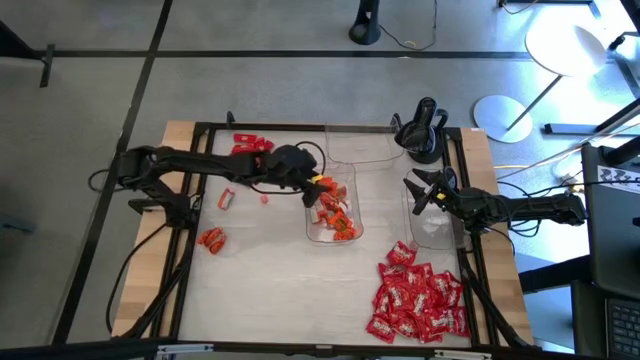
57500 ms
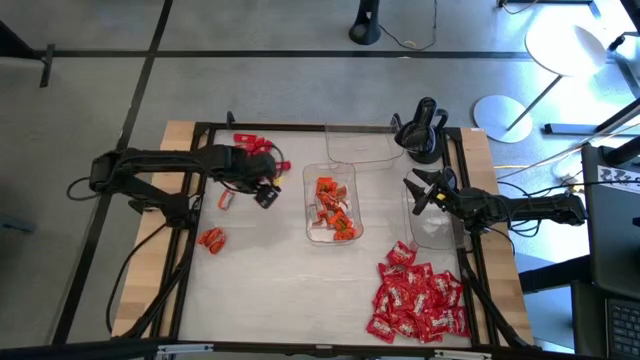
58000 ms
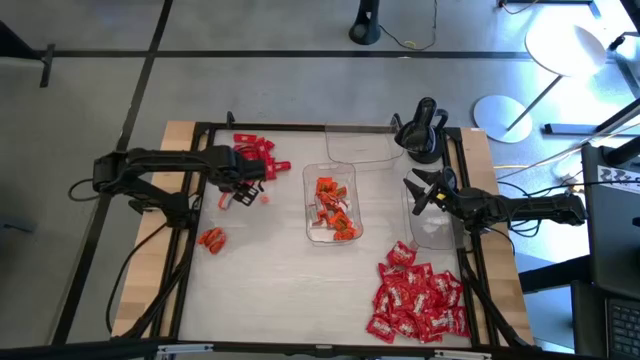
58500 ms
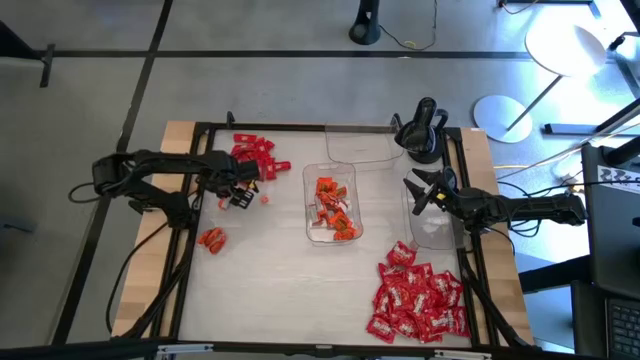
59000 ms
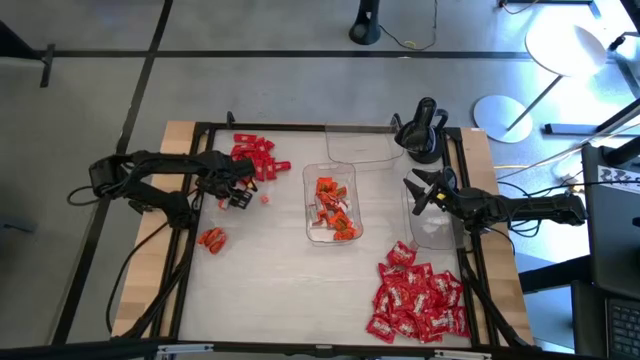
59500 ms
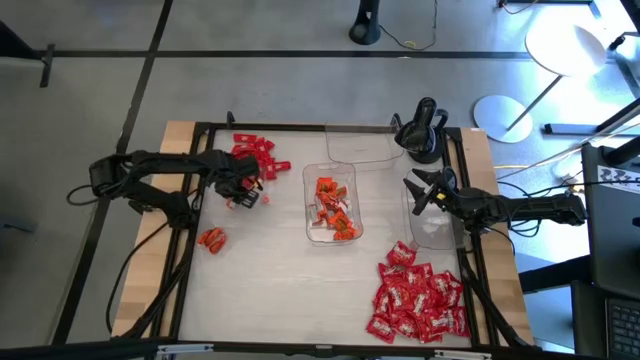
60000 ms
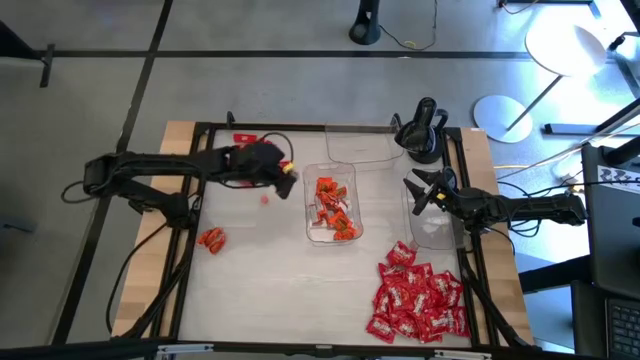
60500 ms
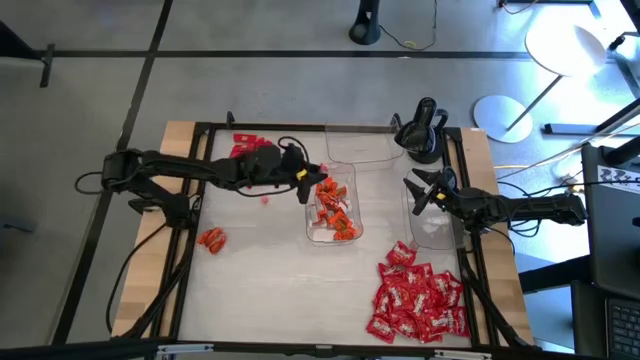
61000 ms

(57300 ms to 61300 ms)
Task: Sort candy
Put the orange chocolate into the bottom left transparent bin

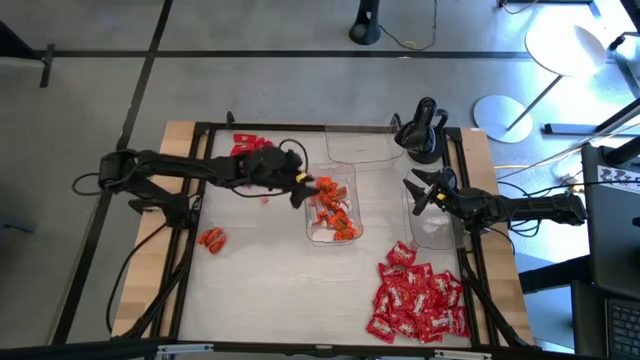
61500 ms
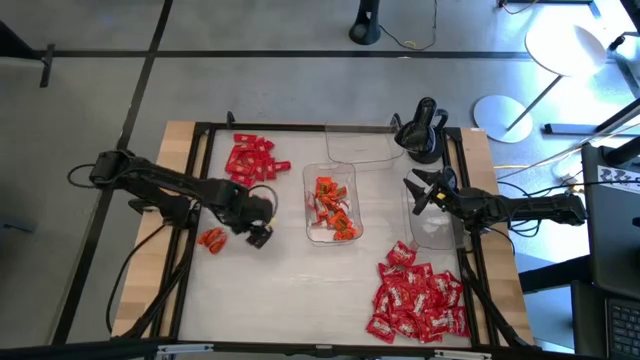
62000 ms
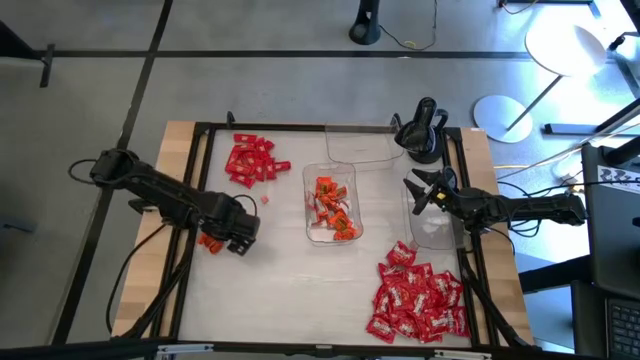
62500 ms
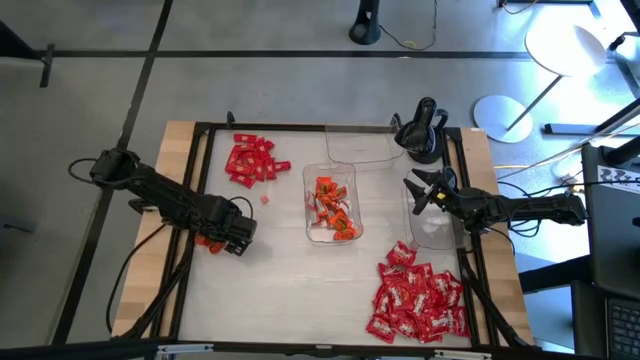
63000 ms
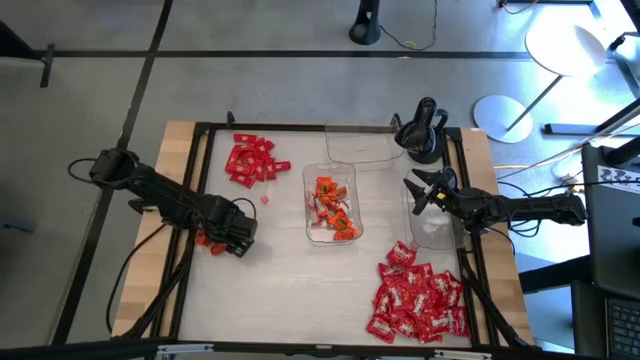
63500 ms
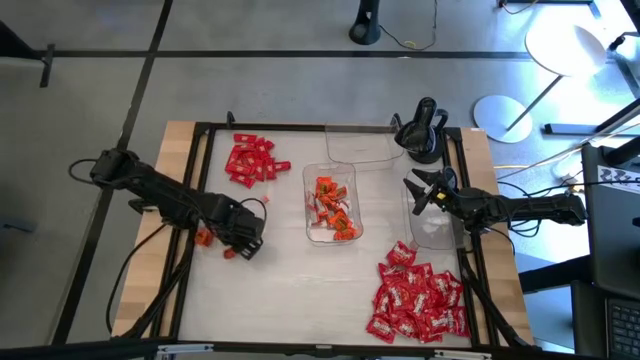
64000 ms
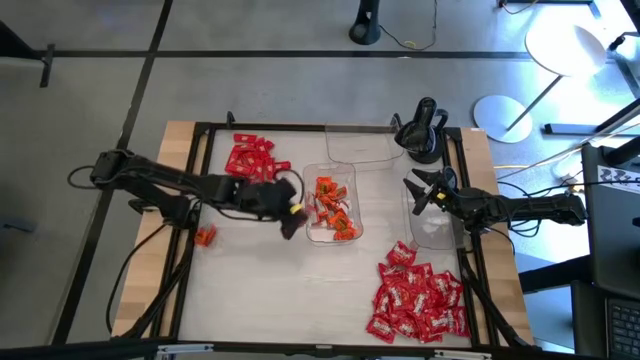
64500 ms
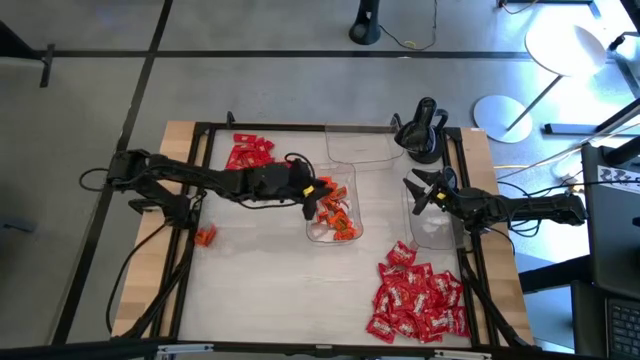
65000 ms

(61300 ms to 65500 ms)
Put the orange chocolate into the bottom left transparent bin

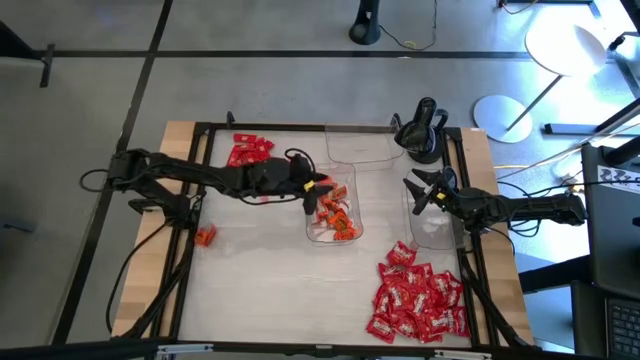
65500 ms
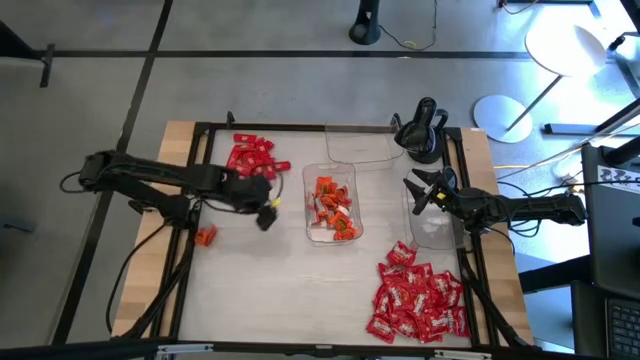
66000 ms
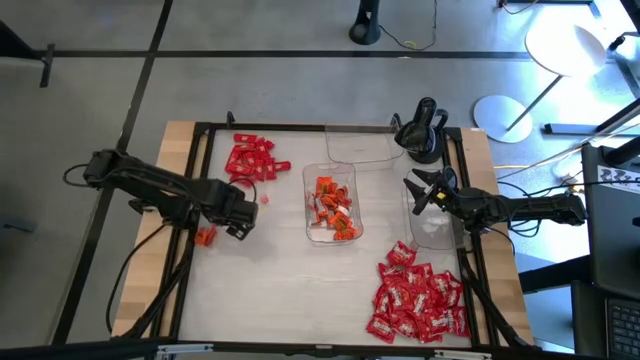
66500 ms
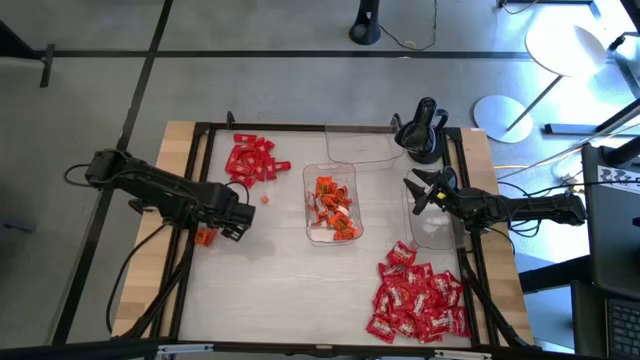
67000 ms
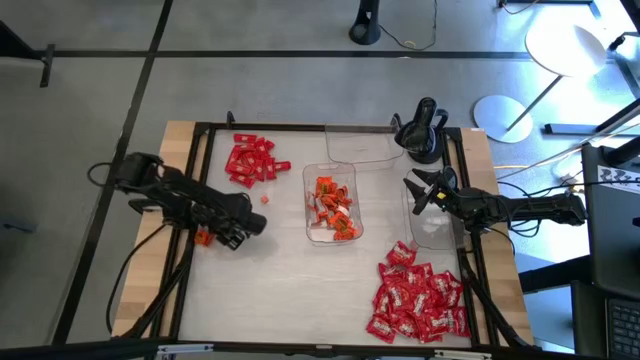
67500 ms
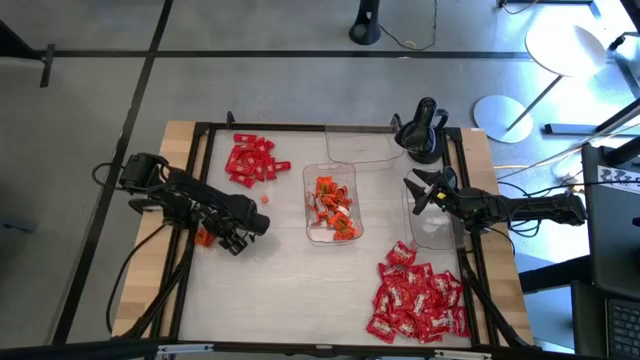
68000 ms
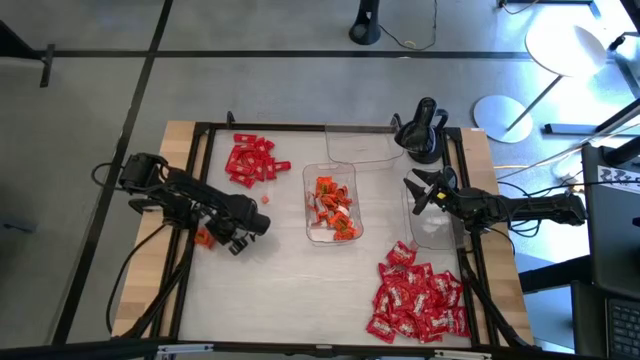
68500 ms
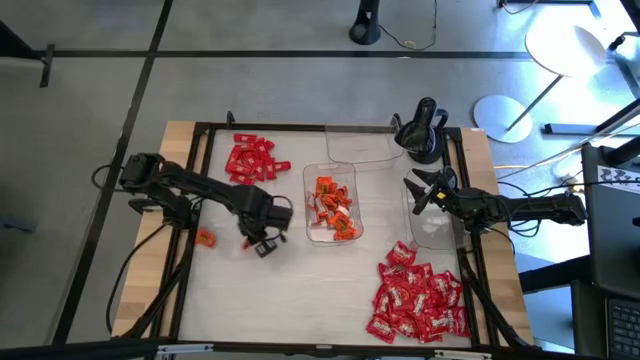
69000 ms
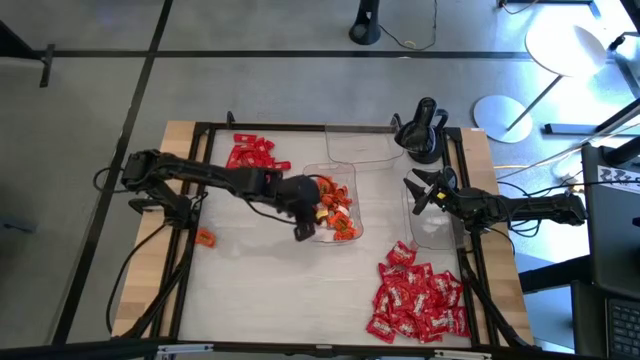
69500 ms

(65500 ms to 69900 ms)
Put the orange chocolate into the bottom left transparent bin

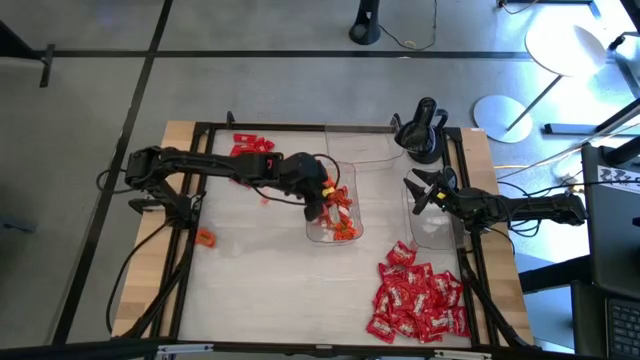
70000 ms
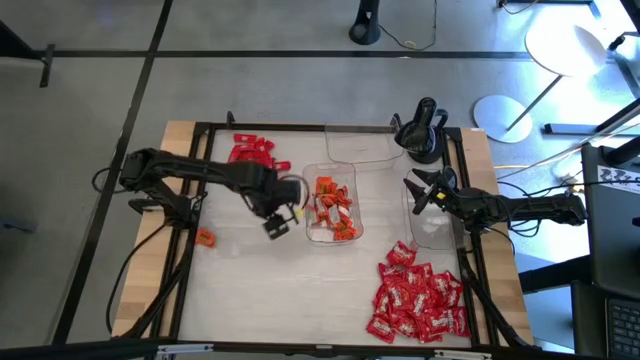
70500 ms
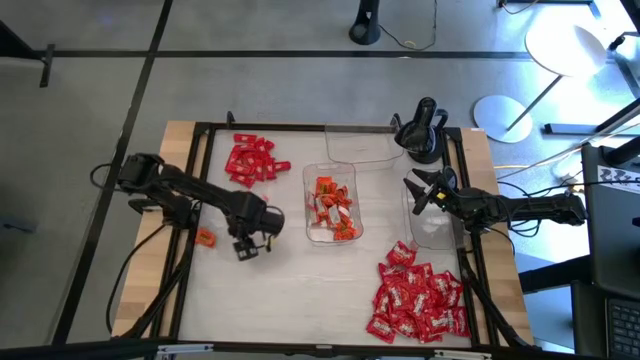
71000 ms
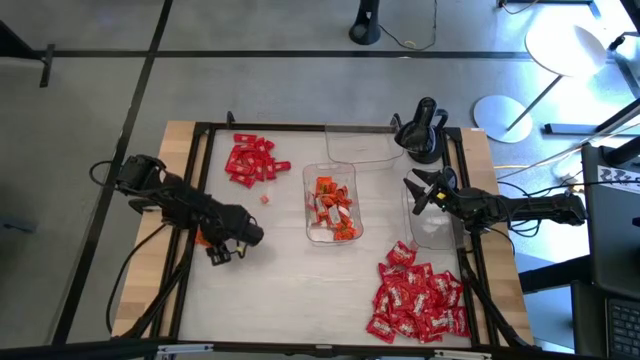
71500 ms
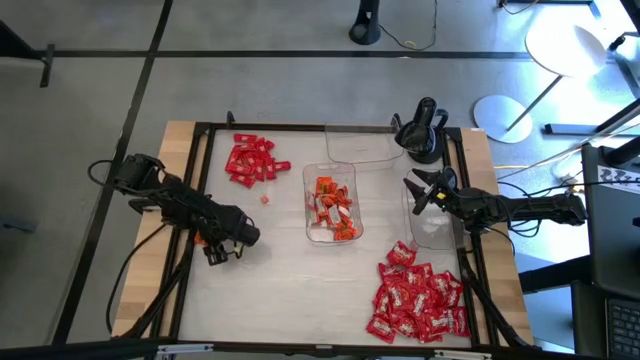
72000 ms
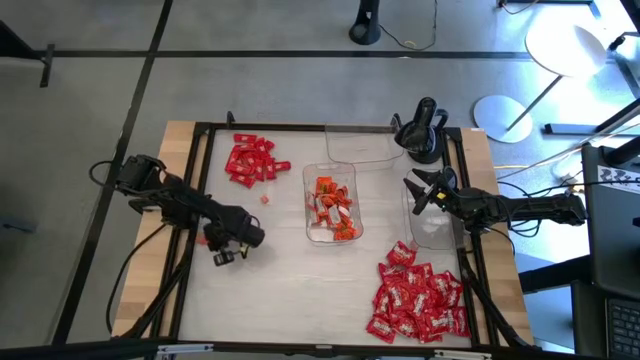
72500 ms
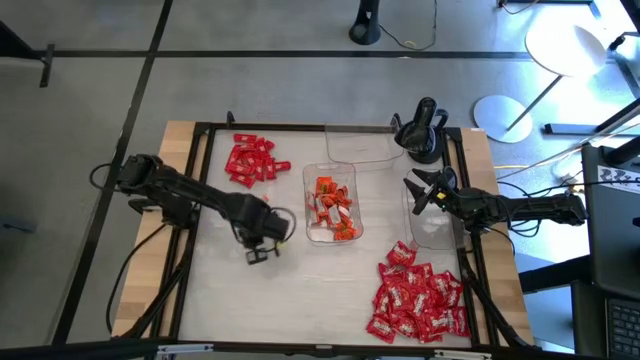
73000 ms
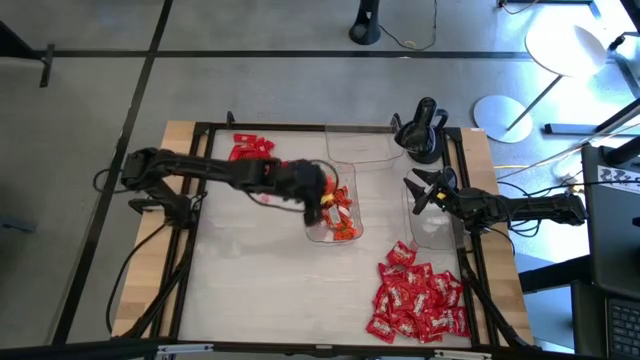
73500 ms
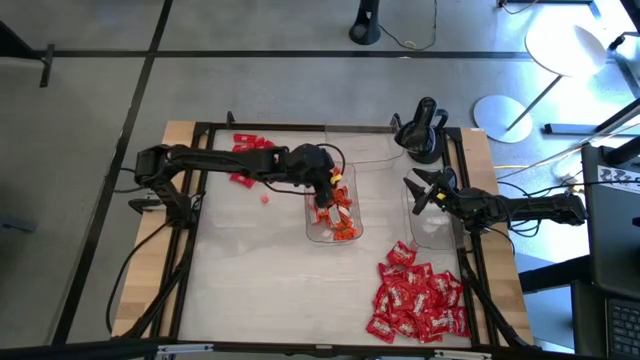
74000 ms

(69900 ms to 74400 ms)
Put the orange chocolate into the bottom left transparent bin

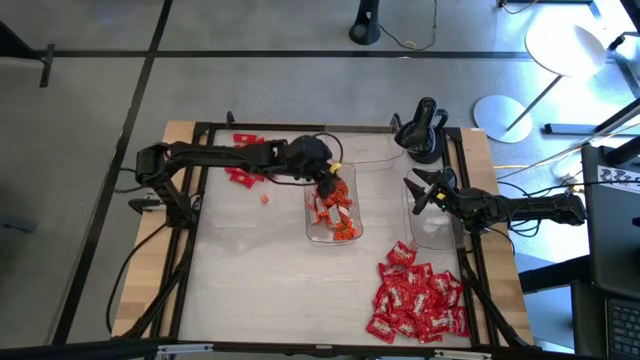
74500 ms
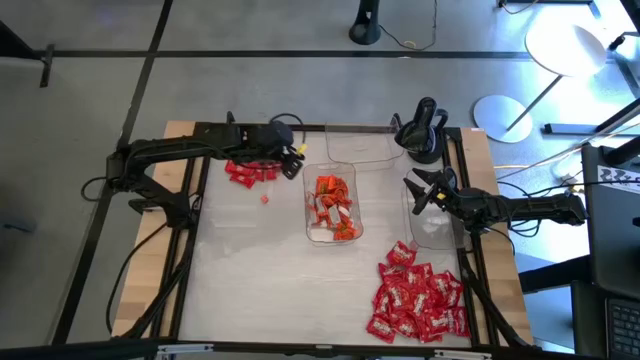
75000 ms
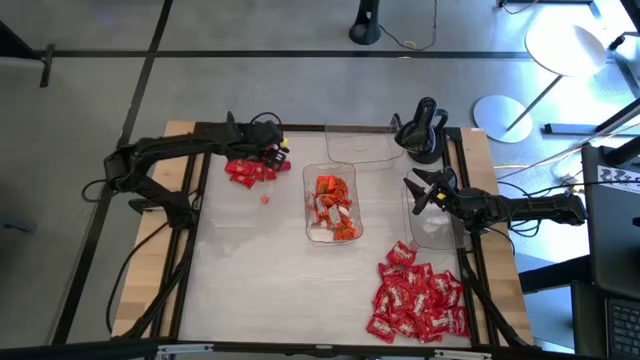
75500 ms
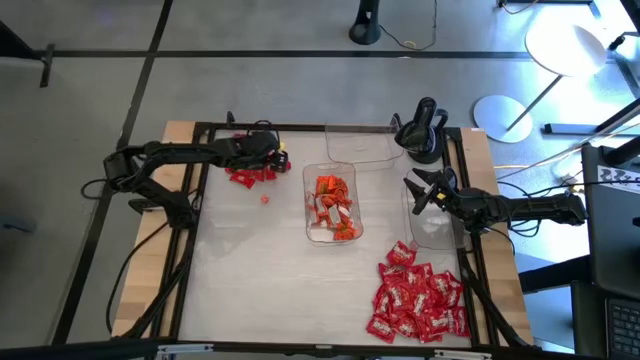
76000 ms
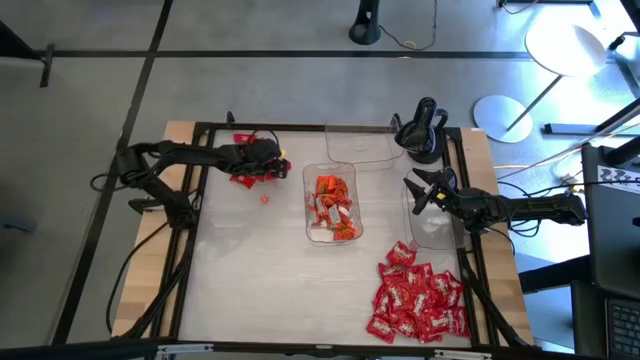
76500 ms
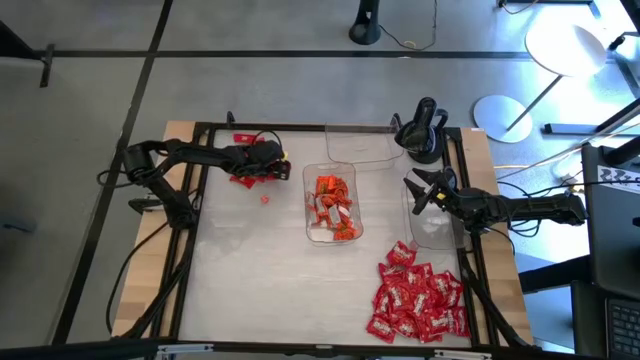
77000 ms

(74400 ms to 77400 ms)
Put the red chocolate into the top transparent bin

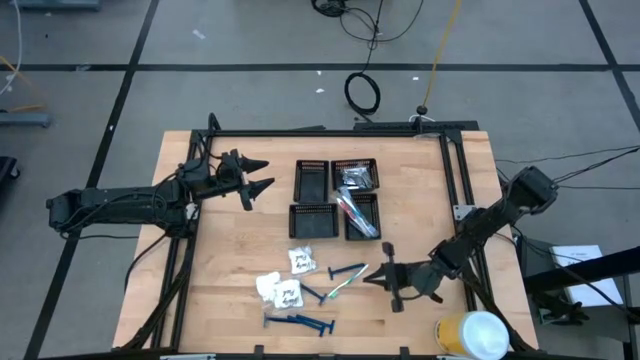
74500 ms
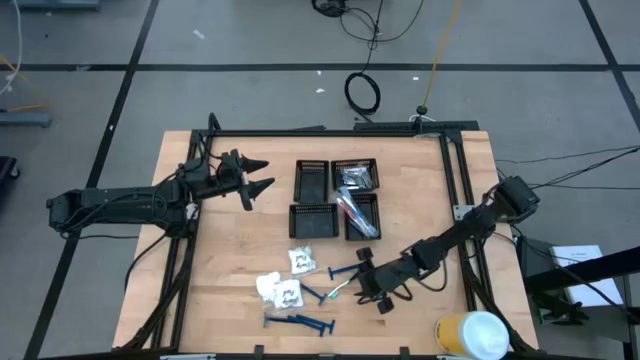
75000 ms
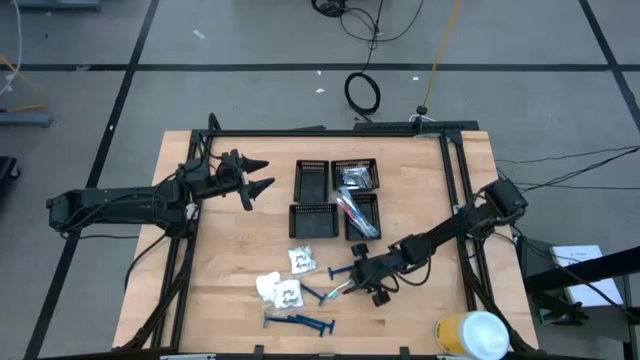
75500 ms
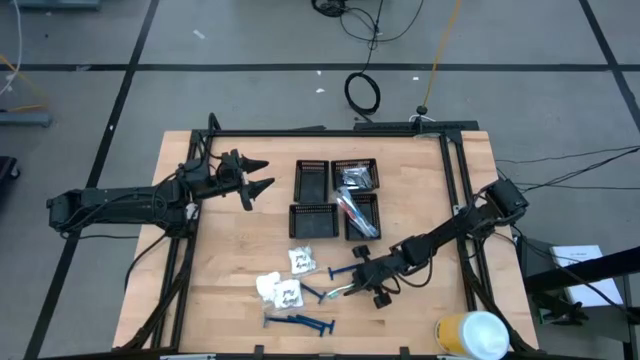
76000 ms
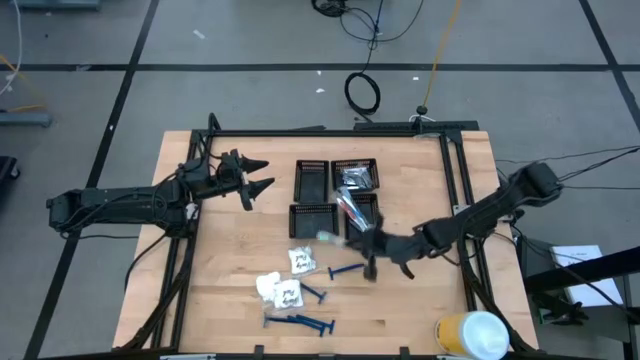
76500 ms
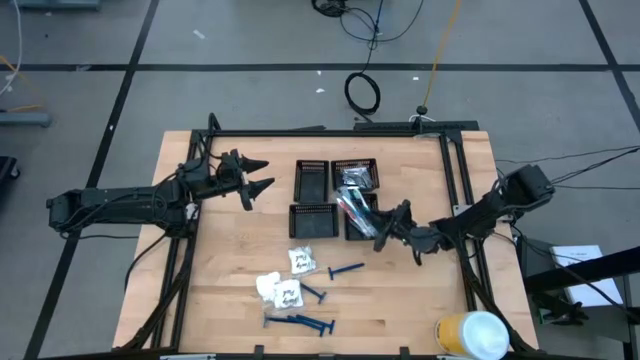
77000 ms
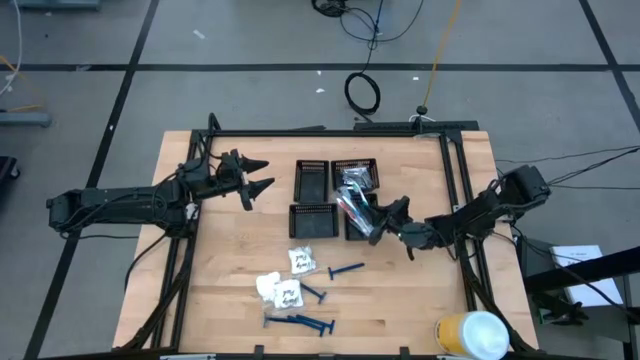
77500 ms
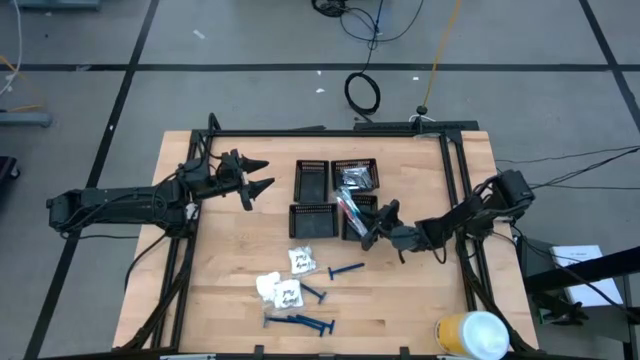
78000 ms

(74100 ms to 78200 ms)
Task: Pick & Place Travel size toiletries
Put the green toothbrush into the bottom right black bin
